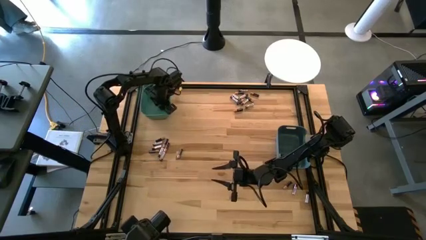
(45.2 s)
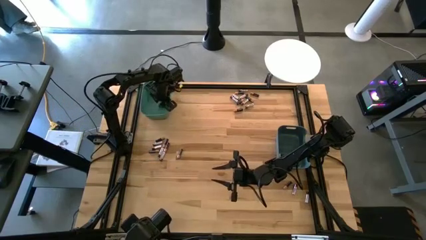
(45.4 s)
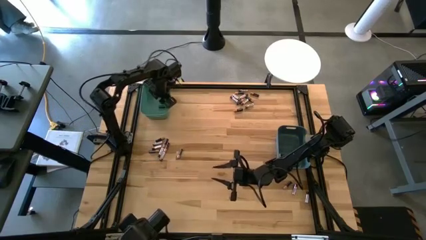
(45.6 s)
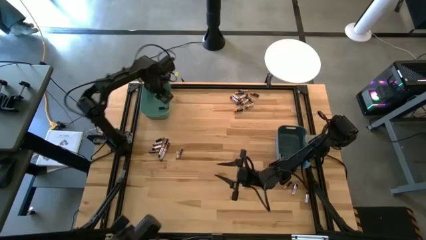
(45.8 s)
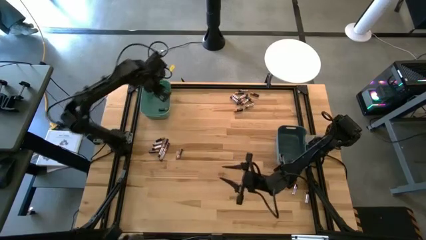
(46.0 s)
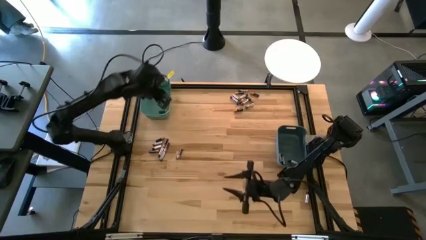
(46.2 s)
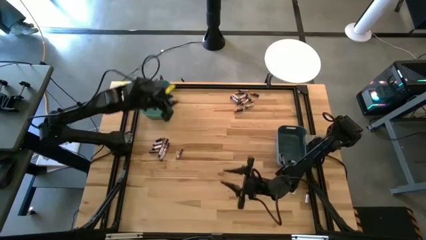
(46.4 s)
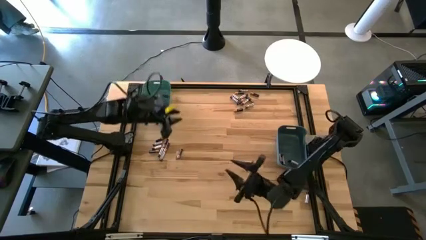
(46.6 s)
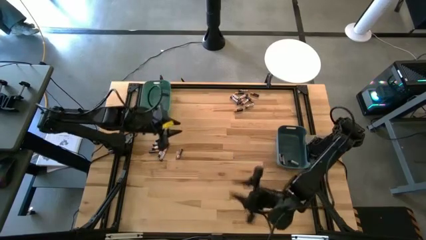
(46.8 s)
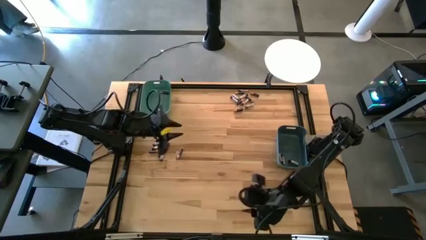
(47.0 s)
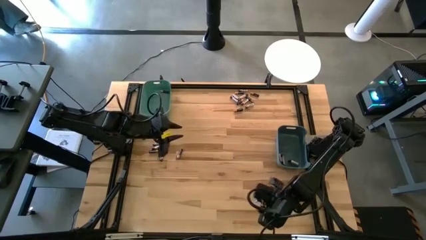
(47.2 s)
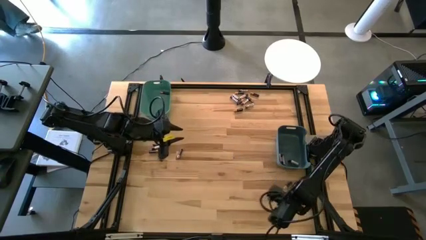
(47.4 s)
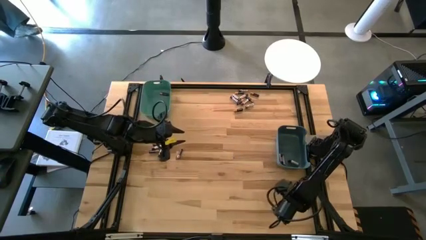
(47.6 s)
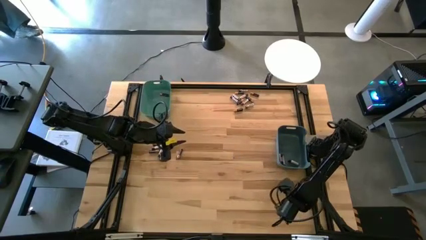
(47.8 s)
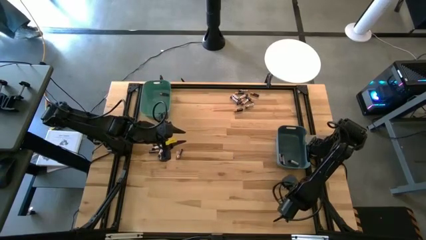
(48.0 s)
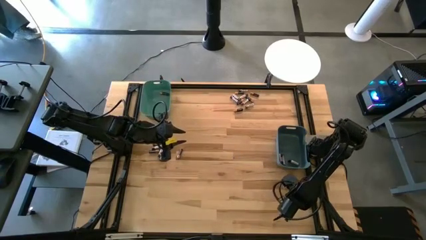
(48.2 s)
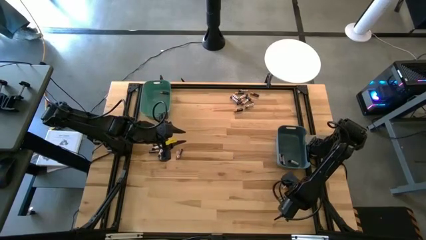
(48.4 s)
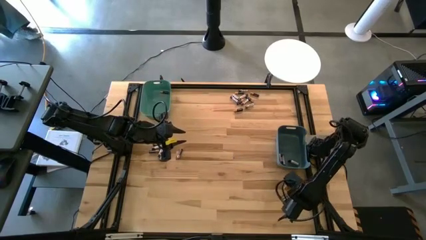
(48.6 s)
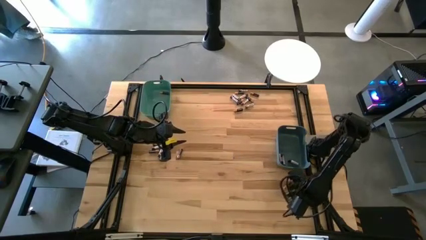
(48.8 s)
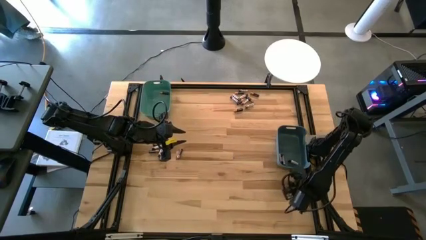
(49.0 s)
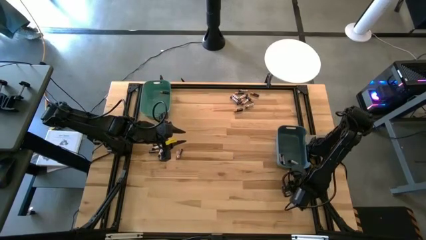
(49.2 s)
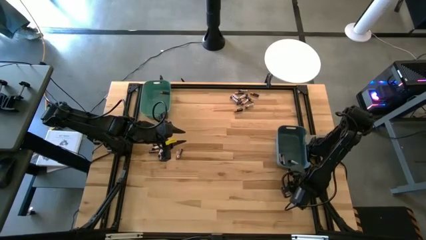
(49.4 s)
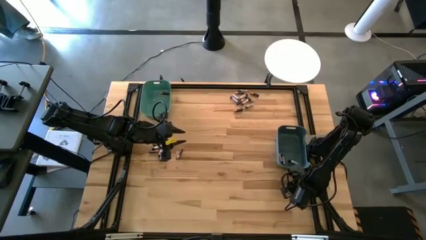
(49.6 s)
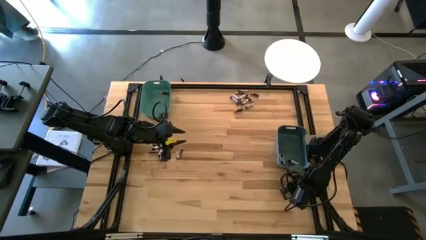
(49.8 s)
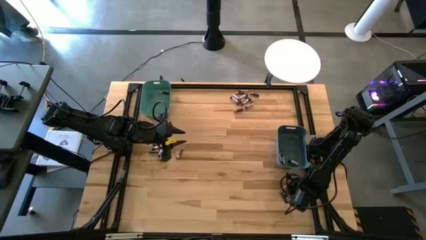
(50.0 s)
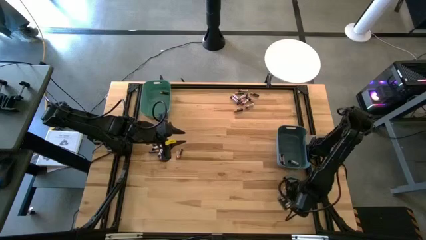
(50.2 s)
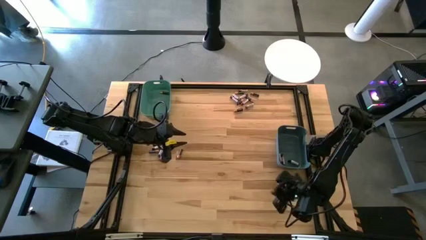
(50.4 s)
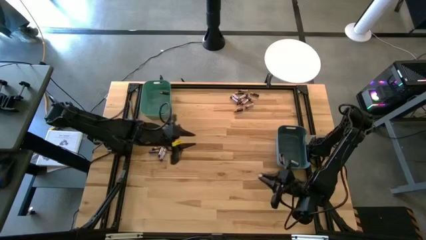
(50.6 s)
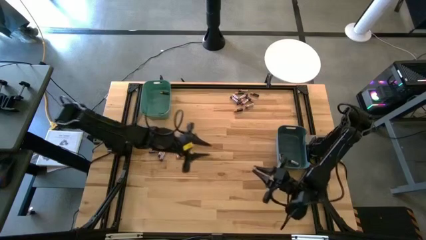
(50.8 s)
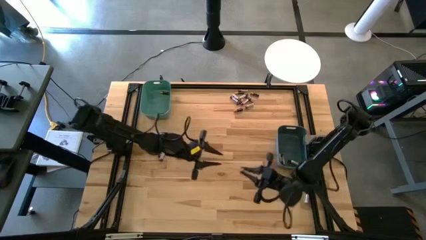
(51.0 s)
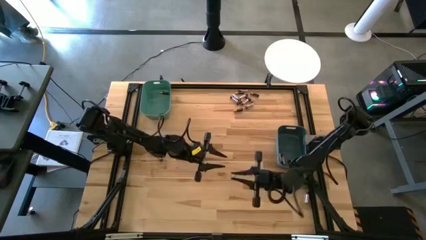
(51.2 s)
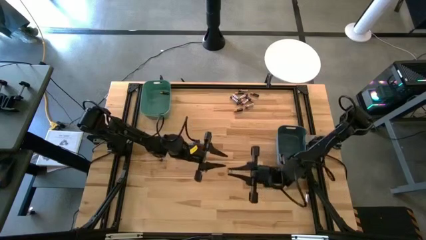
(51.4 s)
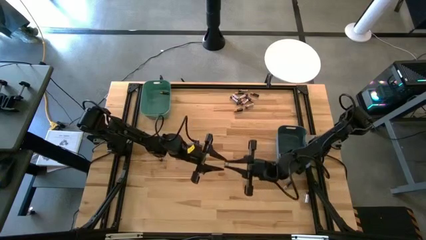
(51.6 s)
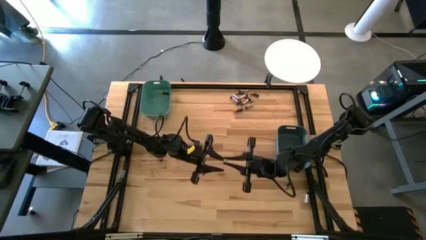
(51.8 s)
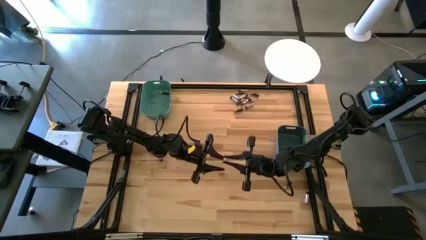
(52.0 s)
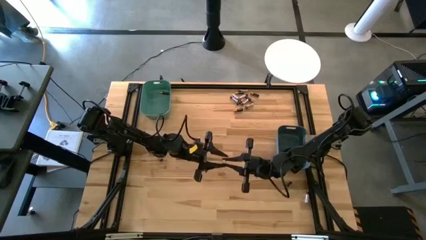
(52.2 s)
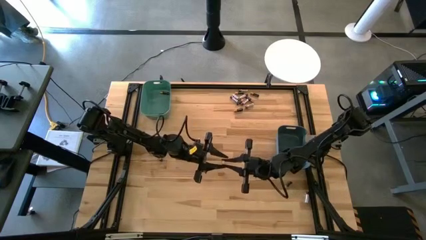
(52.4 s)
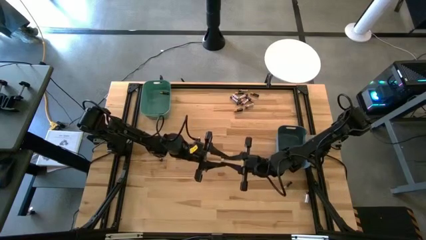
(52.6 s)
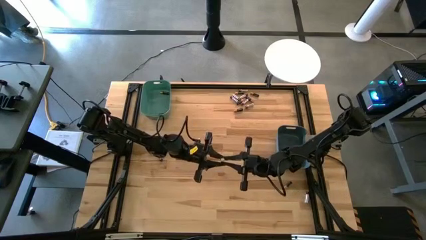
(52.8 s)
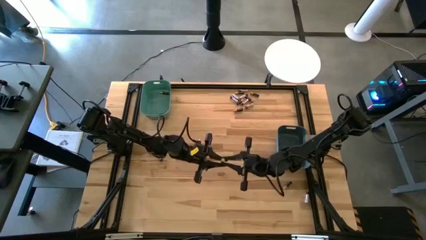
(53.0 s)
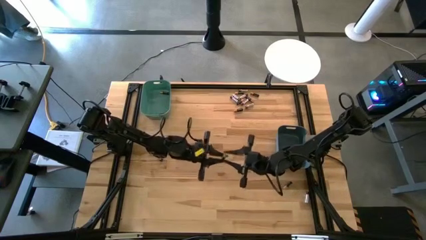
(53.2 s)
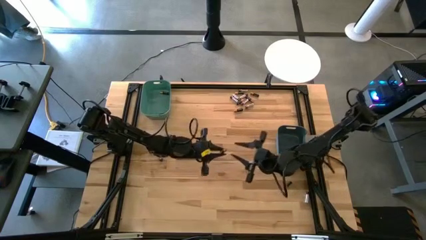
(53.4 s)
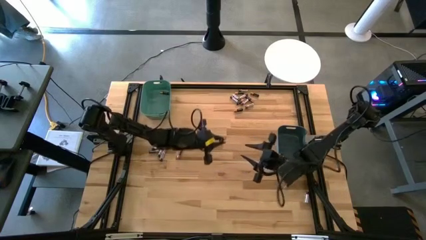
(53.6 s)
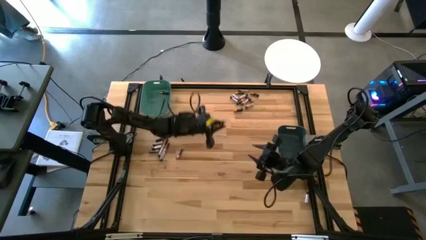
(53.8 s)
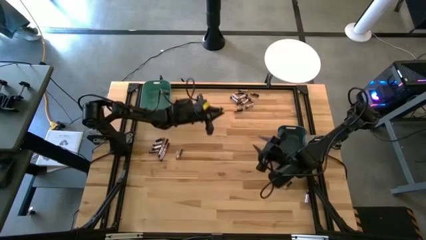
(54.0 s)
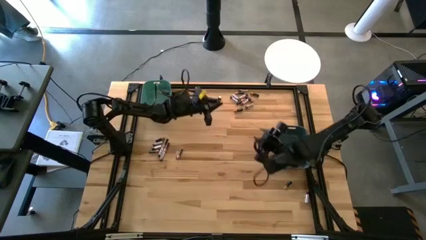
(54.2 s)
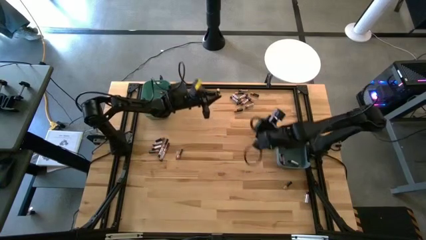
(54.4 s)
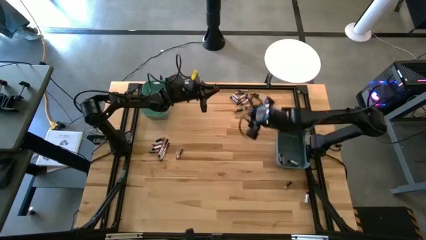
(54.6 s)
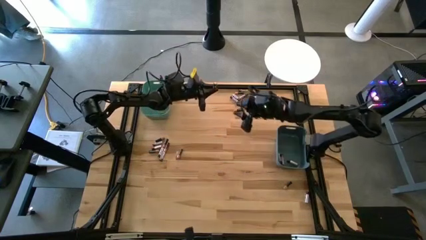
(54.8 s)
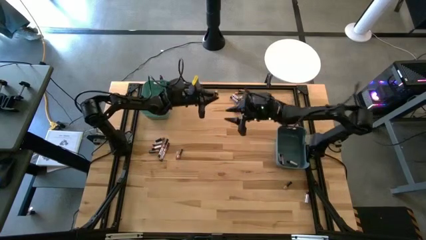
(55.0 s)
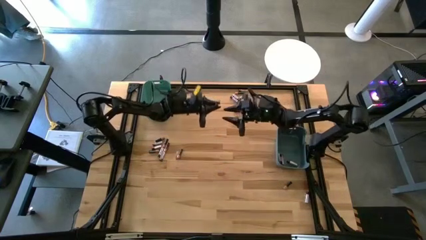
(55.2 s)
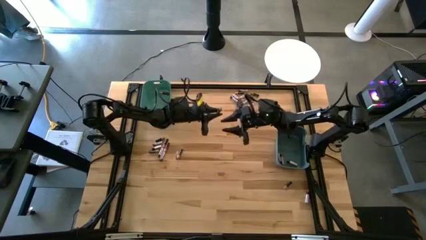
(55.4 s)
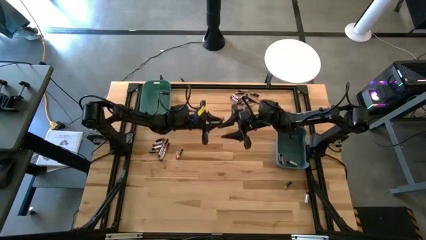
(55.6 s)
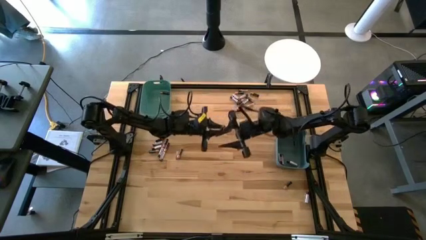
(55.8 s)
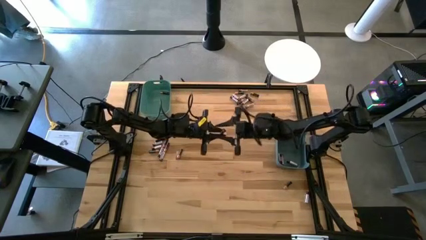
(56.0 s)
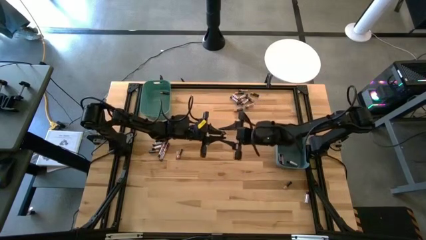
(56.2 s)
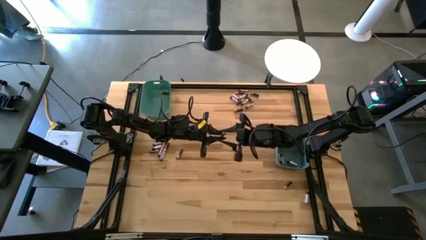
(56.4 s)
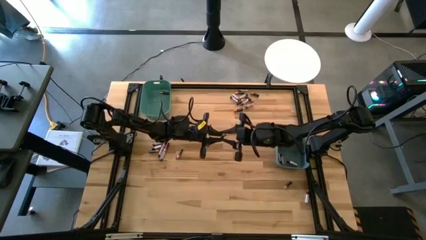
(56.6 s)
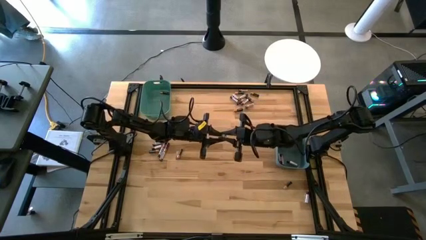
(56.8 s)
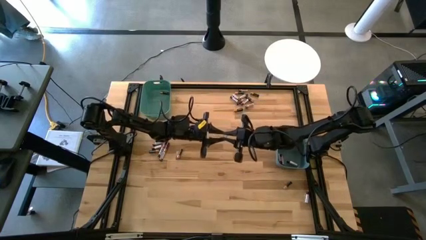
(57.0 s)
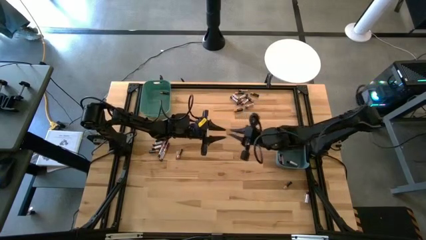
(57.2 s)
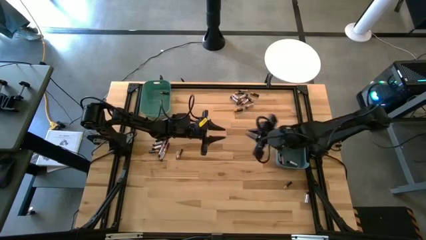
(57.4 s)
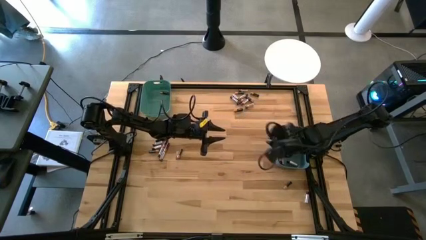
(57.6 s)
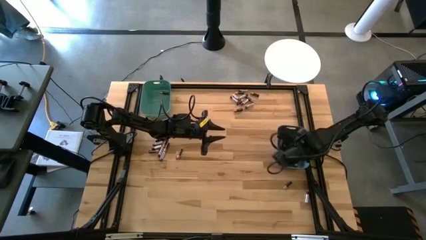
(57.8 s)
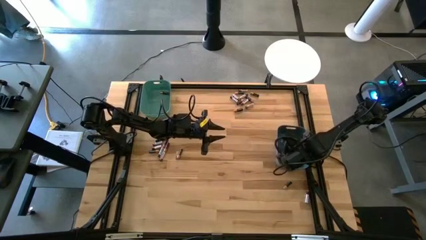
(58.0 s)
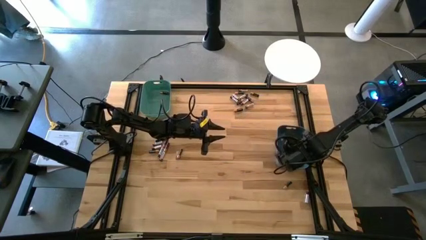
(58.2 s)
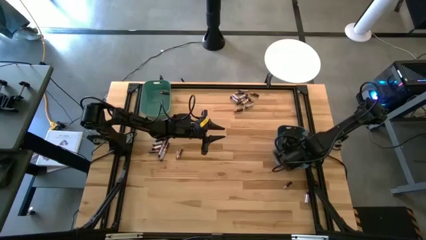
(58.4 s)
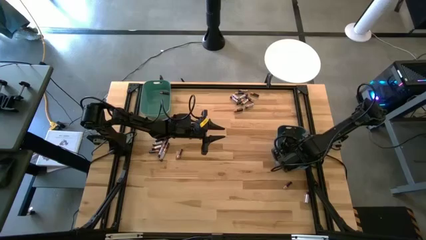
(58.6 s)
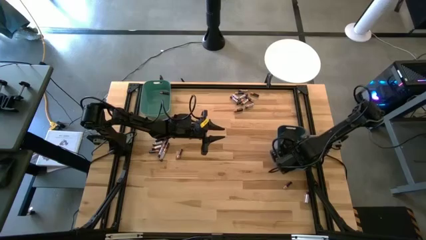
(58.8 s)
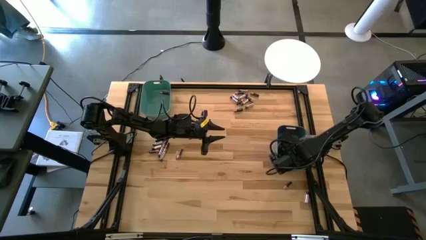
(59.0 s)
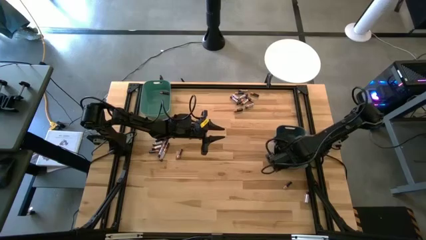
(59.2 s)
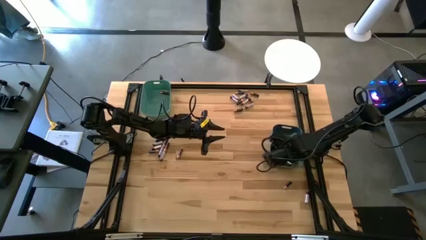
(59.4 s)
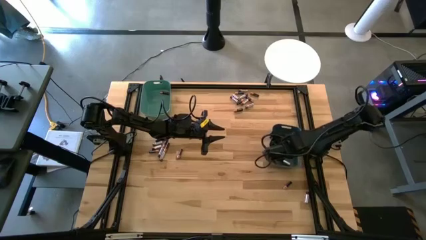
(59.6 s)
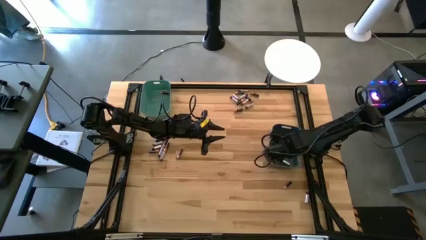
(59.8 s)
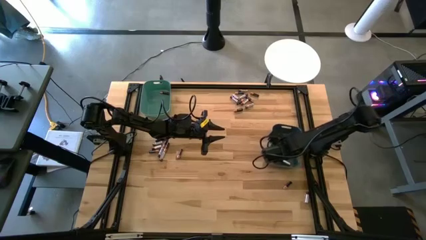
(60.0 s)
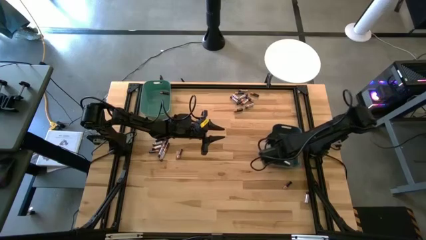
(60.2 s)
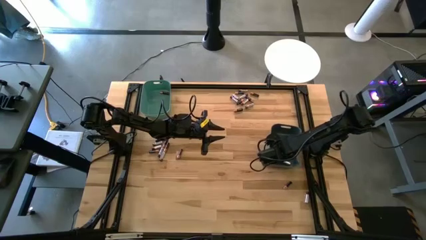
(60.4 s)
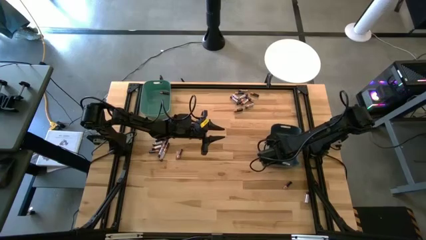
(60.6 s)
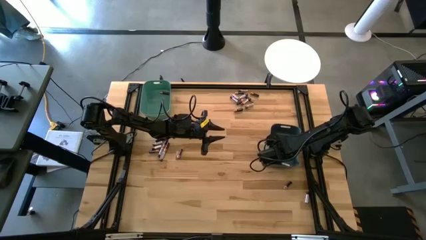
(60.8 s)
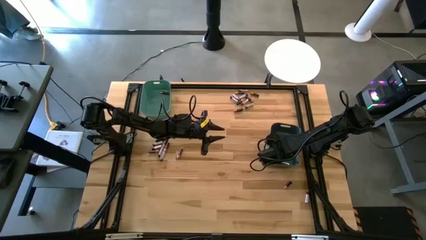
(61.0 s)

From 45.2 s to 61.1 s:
Task: Sort batteries
Put the silver battery into the blue bin
